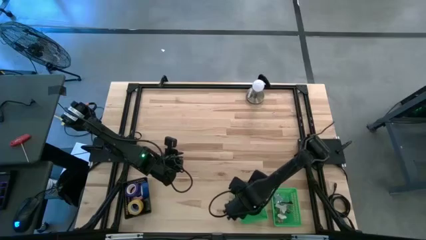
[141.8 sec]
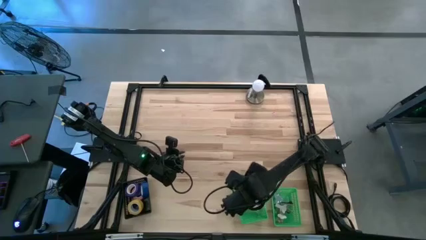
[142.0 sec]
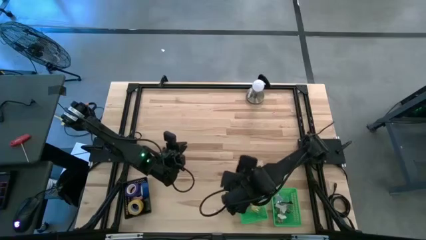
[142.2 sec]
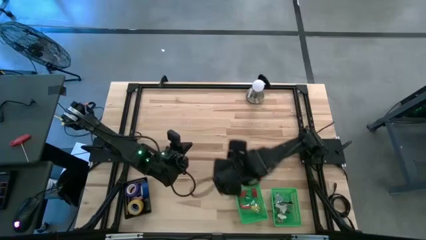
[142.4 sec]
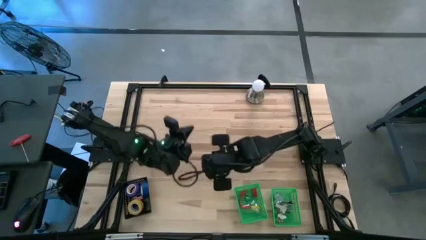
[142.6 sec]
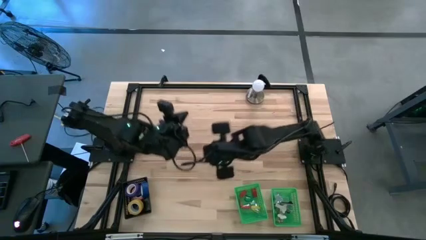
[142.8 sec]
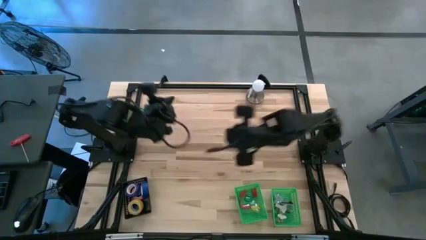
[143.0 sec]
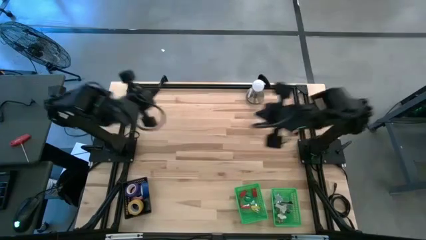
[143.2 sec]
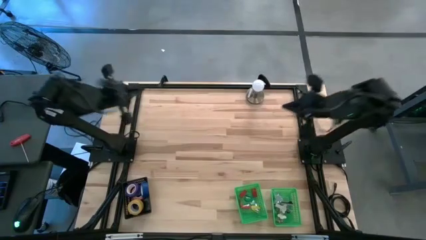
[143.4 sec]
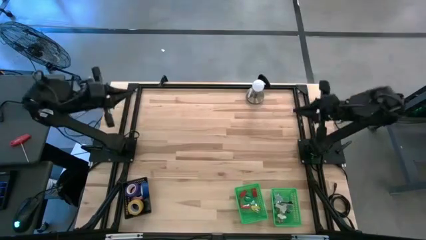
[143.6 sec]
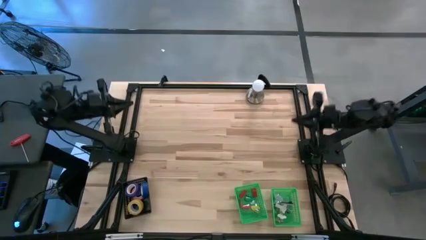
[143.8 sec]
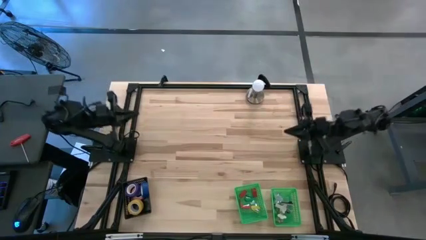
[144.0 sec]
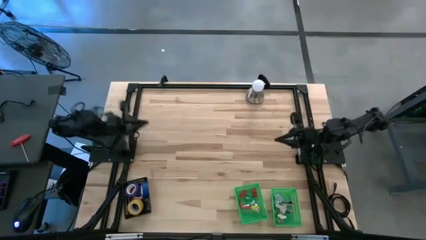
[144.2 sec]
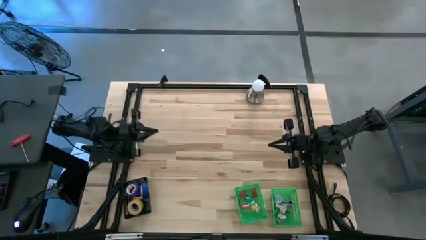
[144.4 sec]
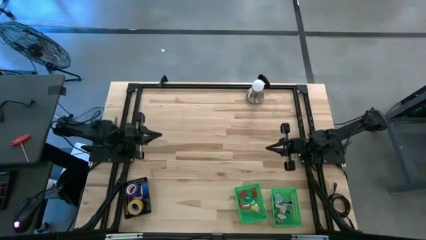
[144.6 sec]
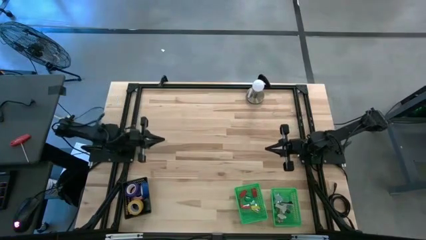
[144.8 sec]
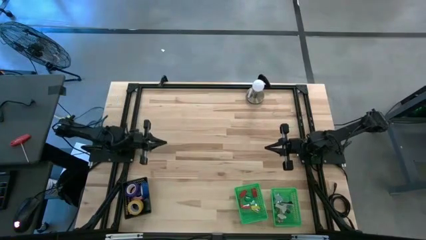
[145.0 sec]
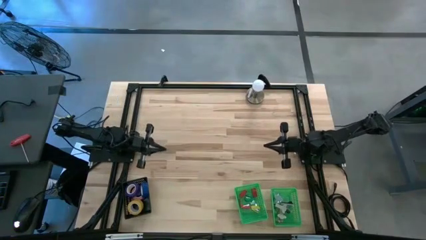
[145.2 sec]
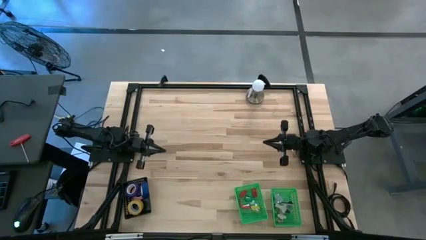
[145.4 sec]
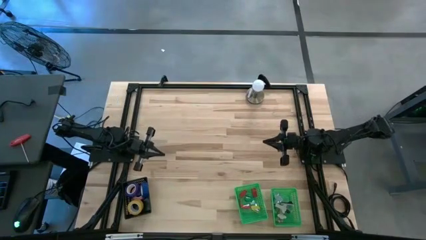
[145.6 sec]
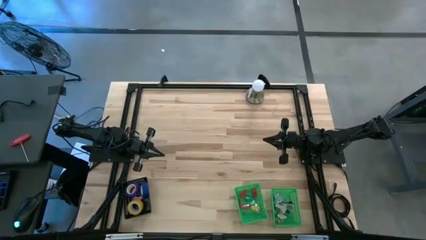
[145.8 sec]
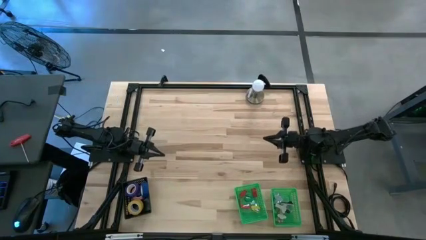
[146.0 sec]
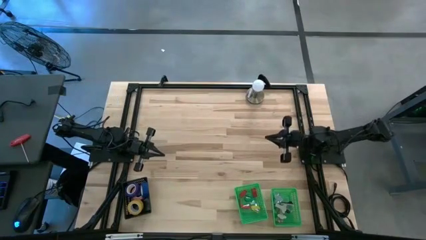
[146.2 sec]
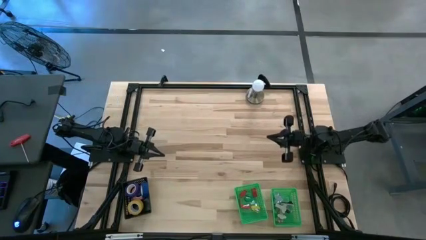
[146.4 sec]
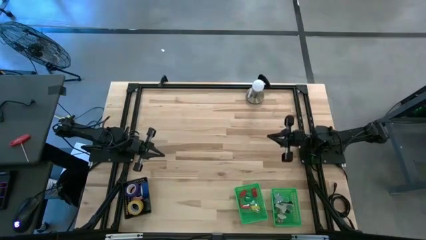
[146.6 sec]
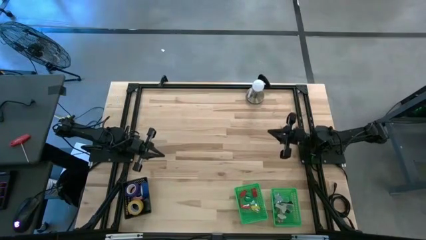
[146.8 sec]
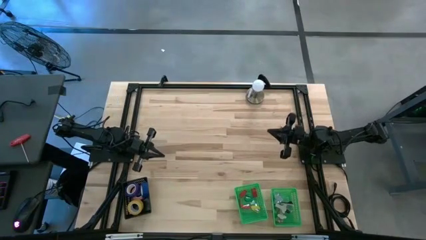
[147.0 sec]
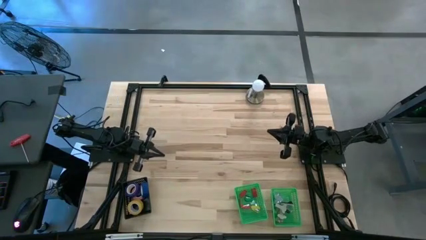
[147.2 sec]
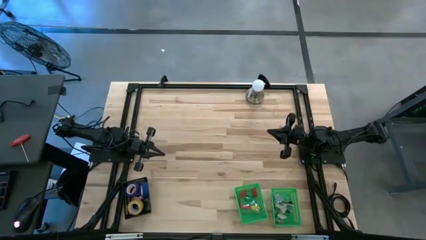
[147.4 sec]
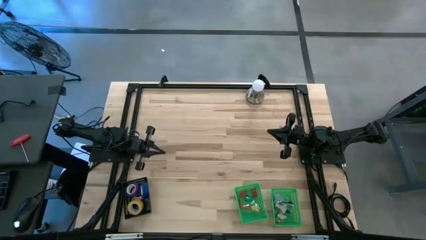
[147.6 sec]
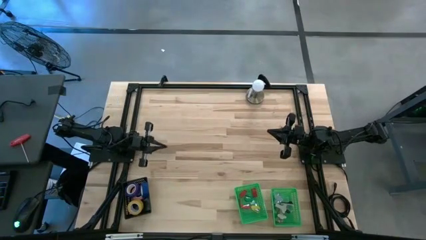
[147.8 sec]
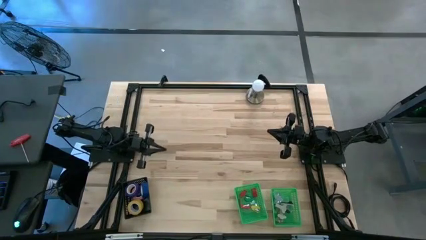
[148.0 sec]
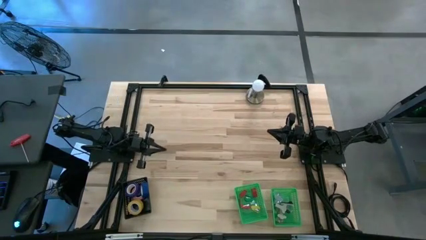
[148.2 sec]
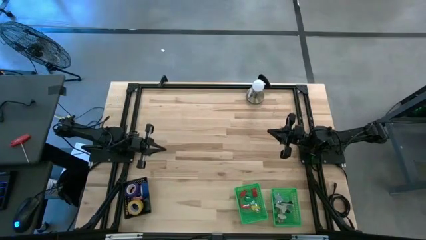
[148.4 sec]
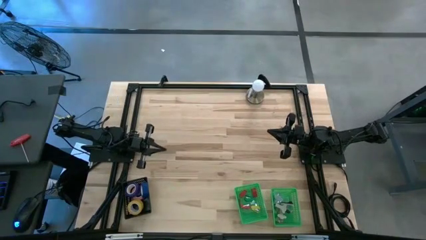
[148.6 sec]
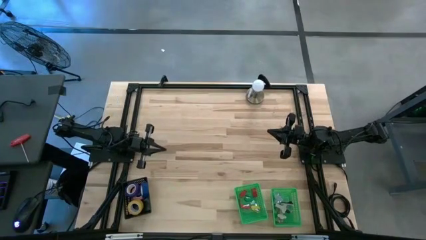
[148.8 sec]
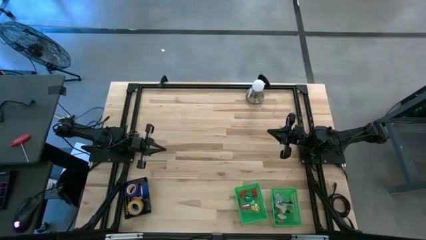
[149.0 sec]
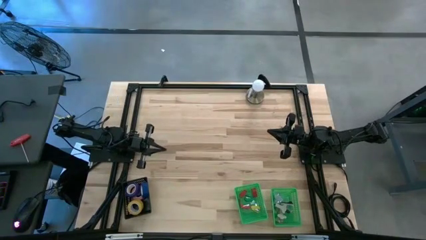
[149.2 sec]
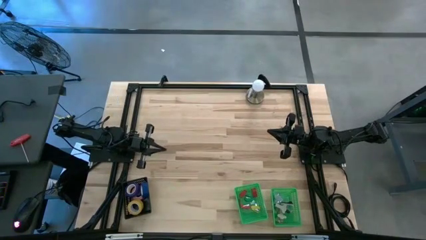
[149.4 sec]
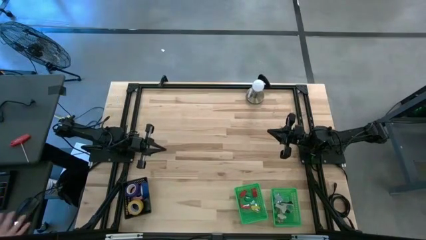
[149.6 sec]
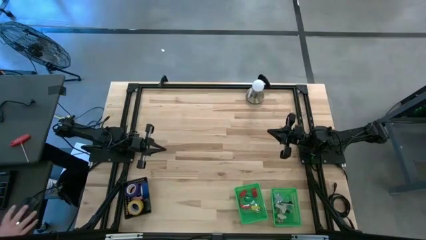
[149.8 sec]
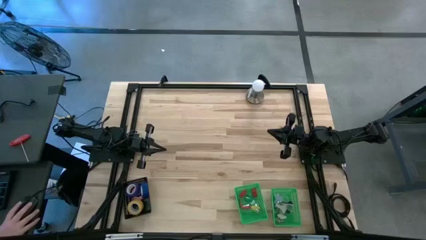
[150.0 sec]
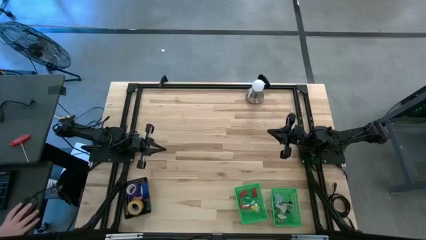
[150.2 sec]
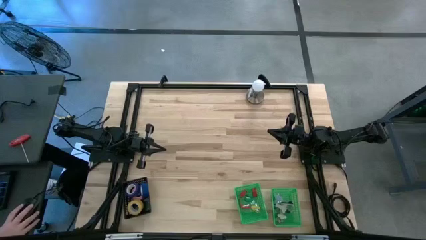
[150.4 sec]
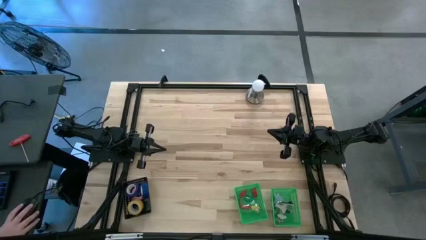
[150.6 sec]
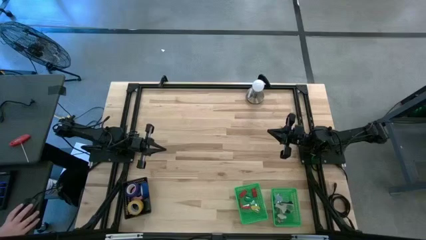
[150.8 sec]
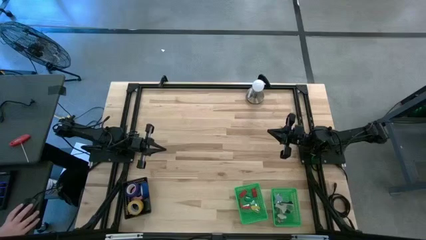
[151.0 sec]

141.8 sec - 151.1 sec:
Task: Pick and place Stapler, Stapler remover, tape
Return to Home Position
